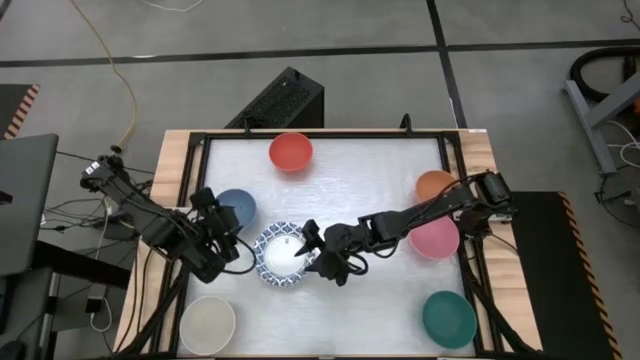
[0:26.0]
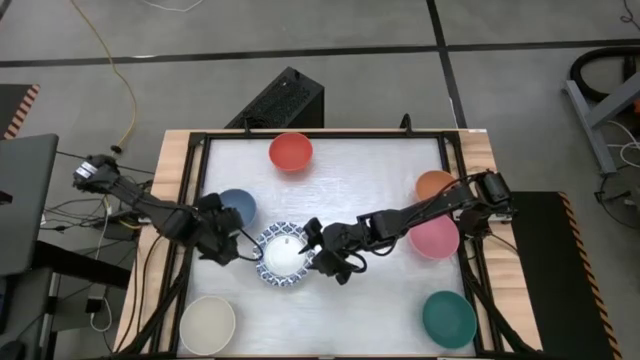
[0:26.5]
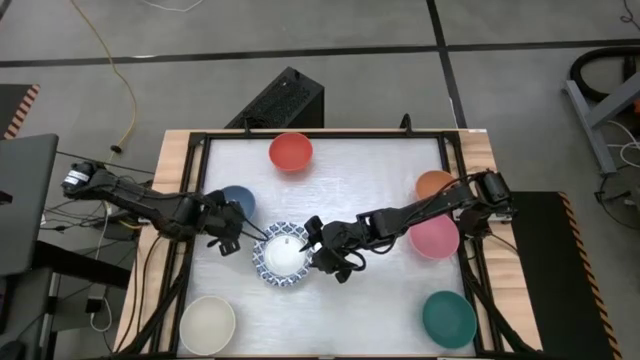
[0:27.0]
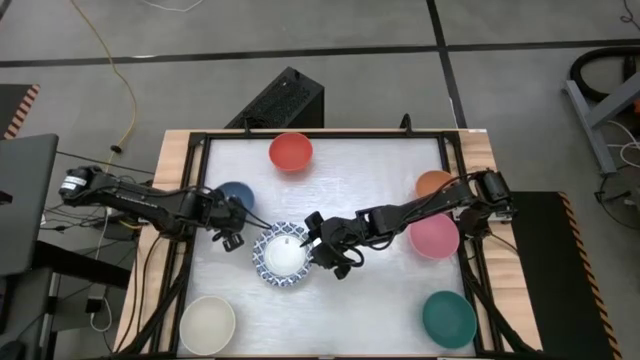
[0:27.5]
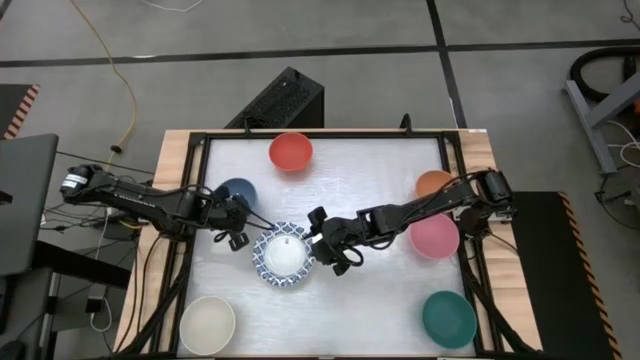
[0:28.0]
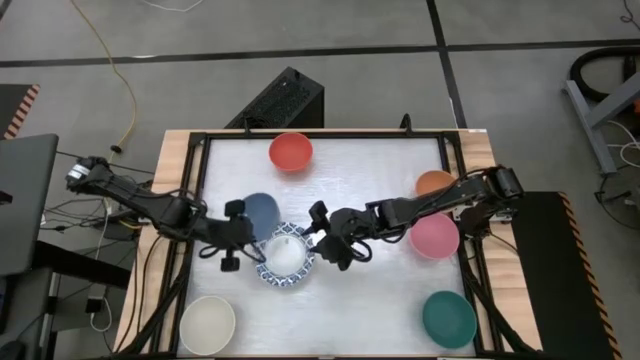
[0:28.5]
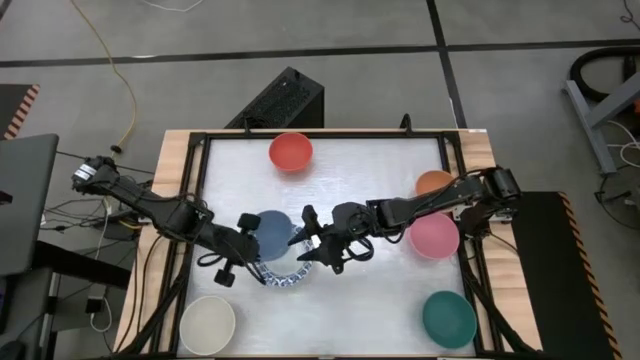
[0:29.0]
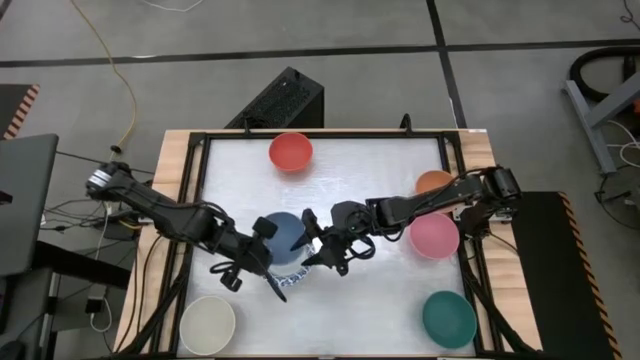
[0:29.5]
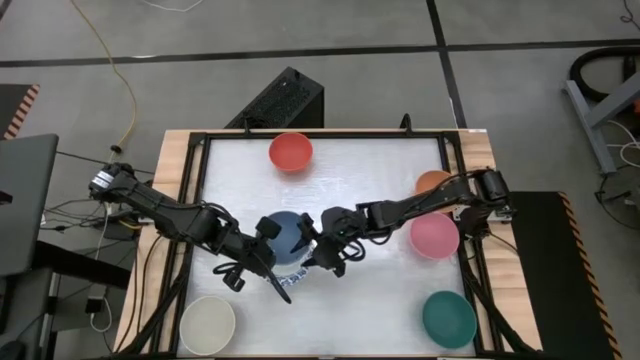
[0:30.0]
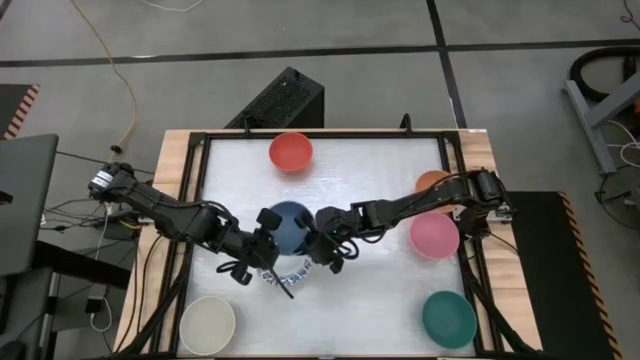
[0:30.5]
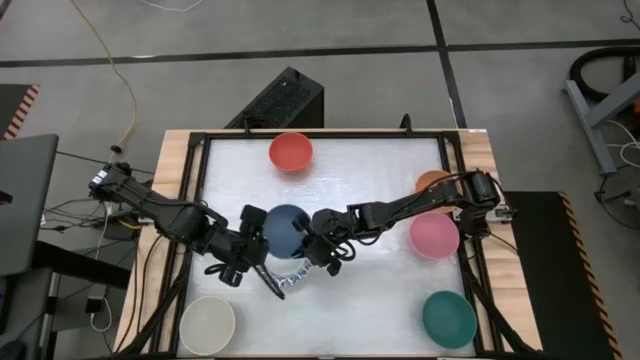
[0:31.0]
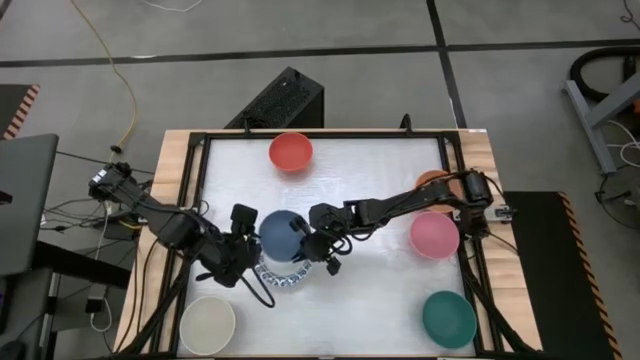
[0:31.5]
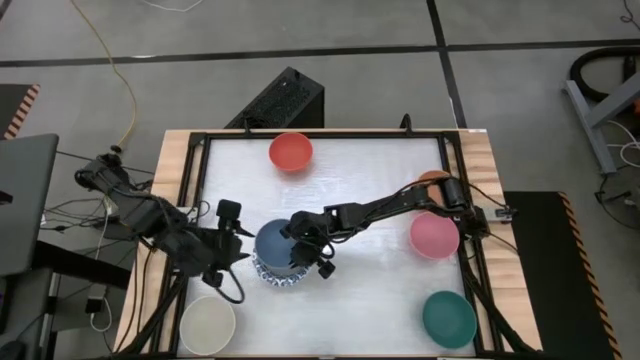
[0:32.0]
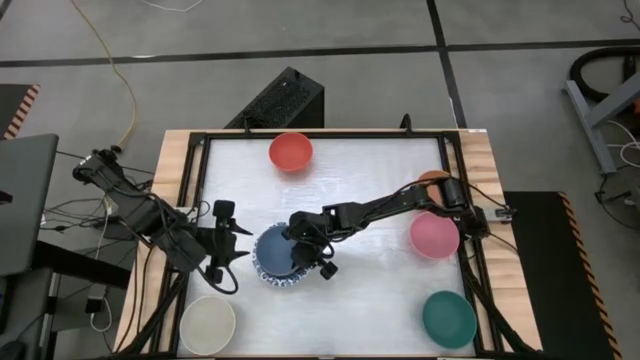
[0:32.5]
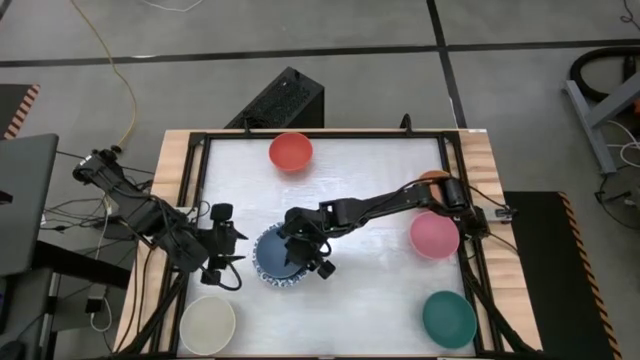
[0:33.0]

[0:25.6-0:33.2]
Stack the blue bowl on top of the white and blue bowl

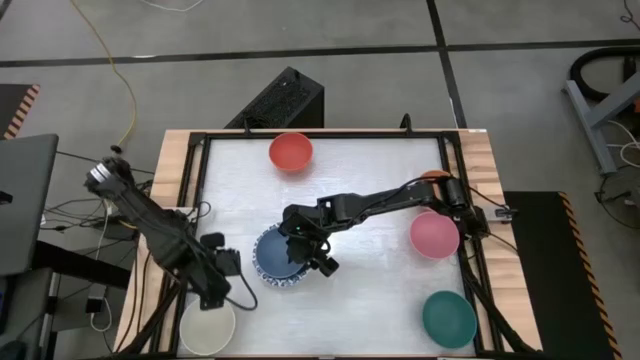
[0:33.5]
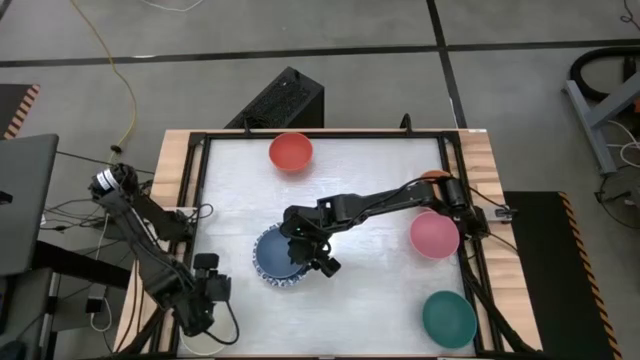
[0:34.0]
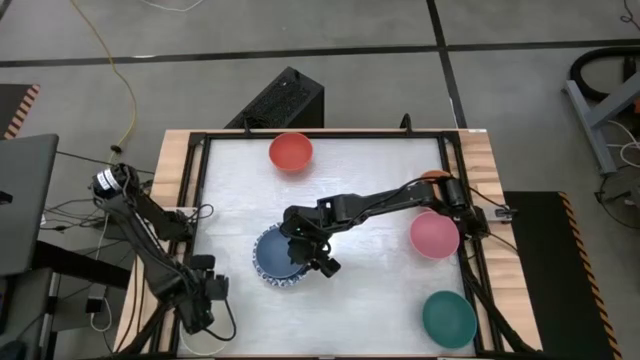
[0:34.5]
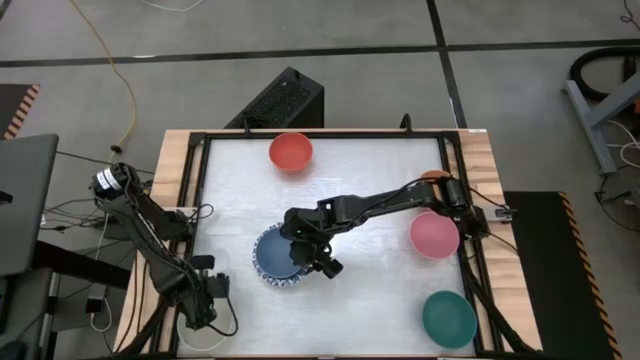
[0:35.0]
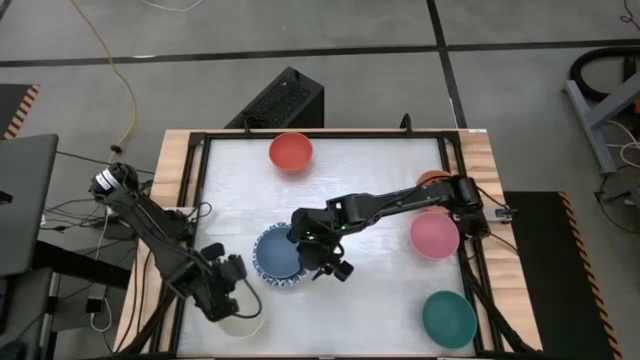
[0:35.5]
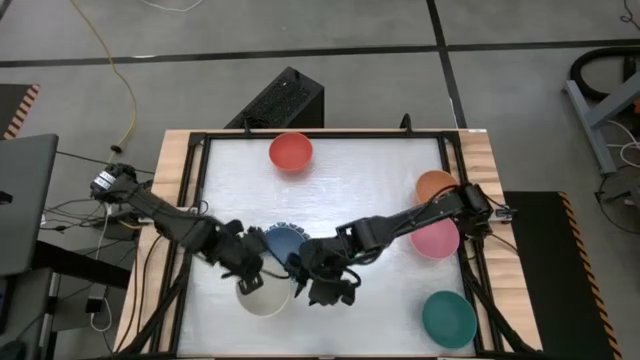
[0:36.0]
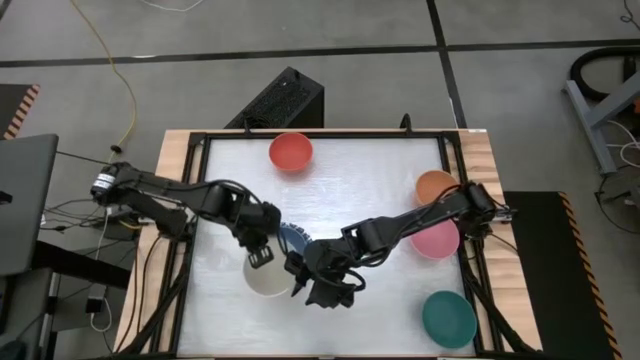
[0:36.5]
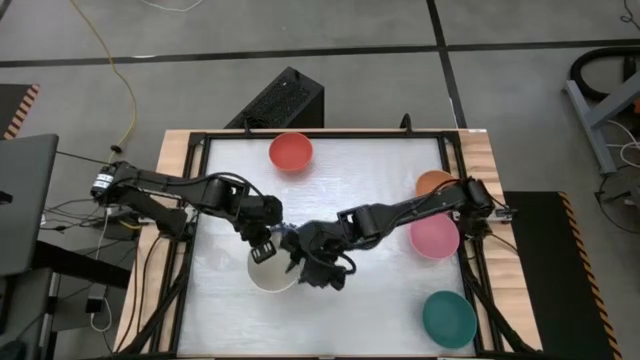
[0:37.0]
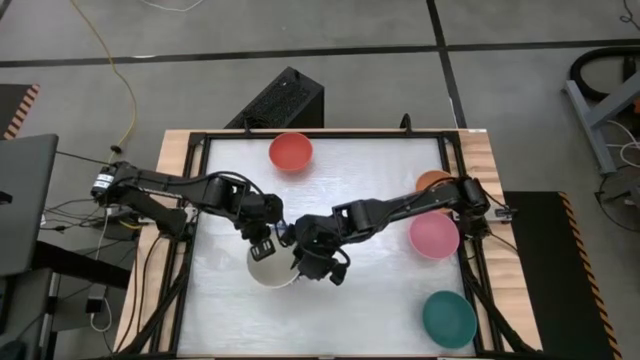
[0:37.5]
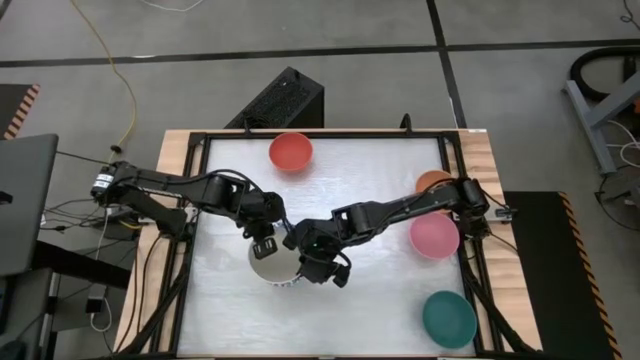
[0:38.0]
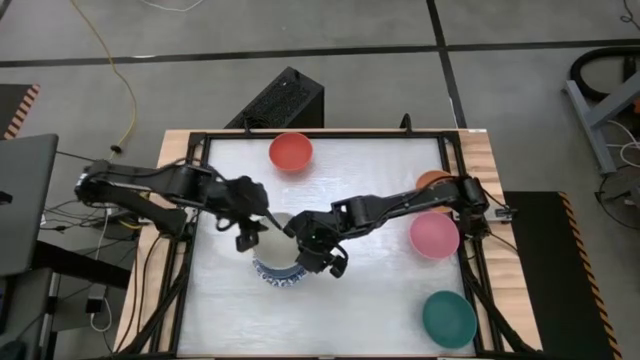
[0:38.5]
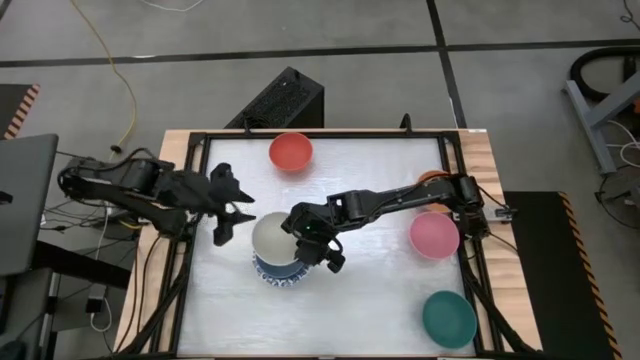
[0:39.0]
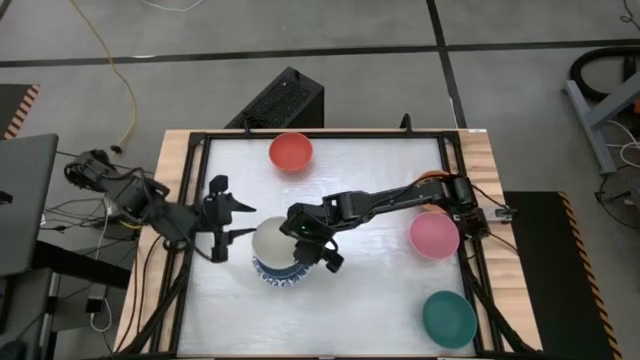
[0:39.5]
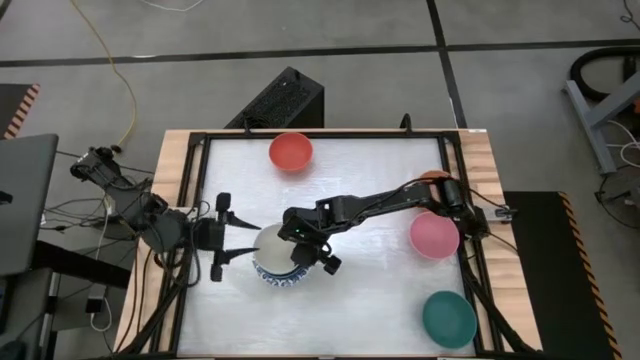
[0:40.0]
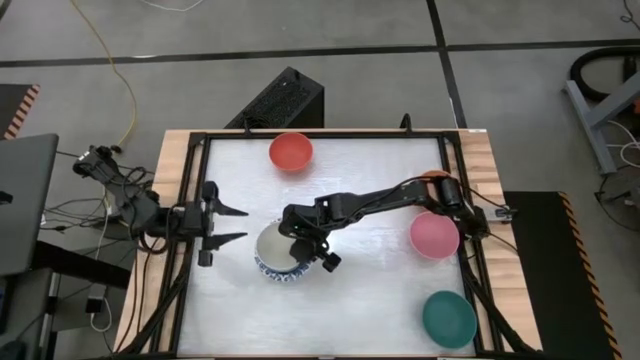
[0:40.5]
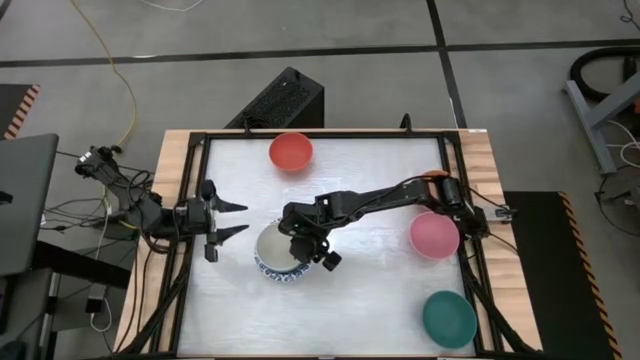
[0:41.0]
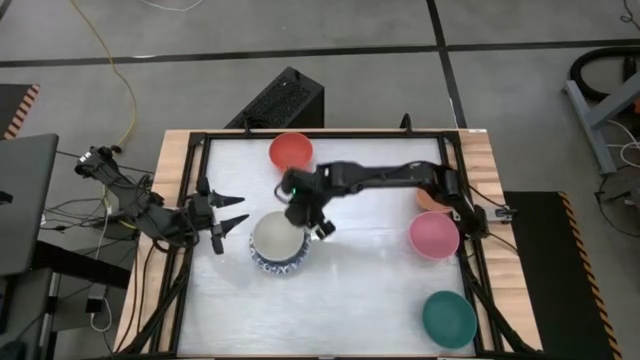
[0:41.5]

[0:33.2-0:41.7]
Stack the white bowl on top of the blue bowl

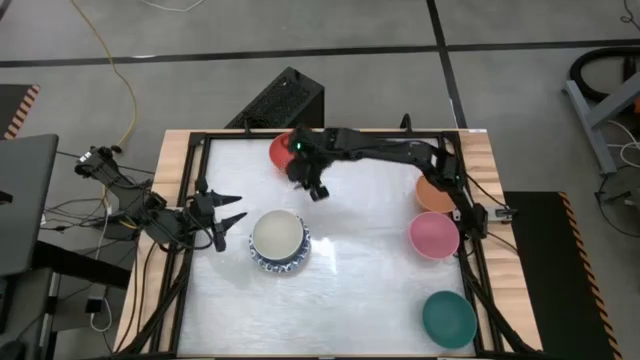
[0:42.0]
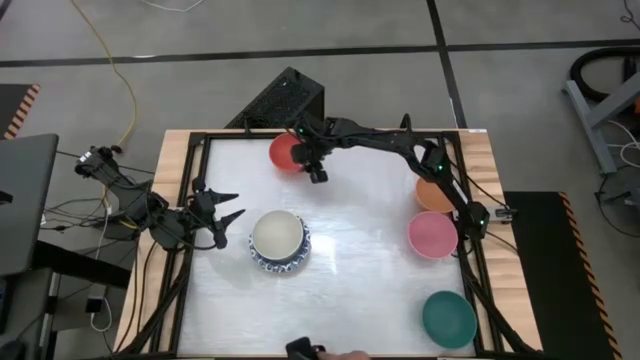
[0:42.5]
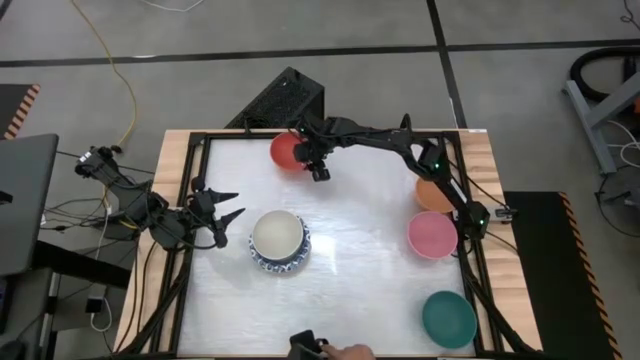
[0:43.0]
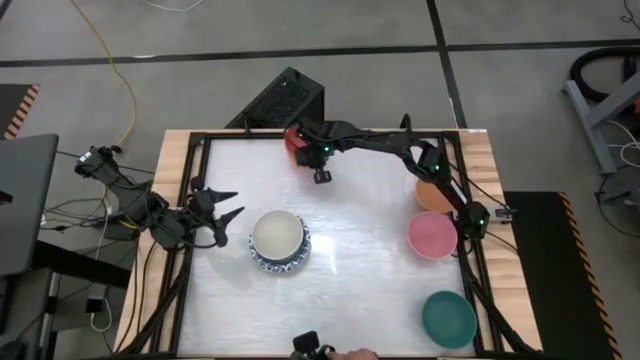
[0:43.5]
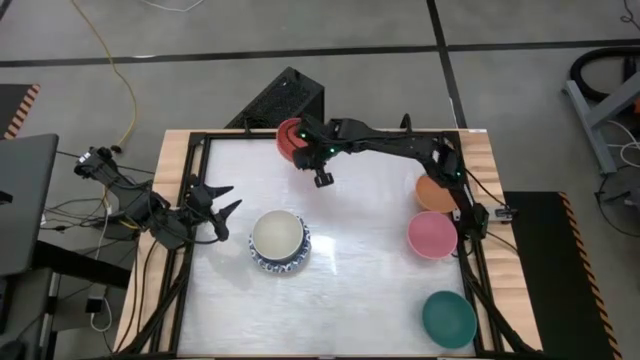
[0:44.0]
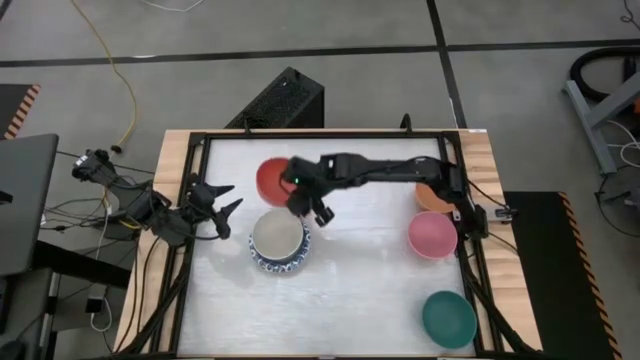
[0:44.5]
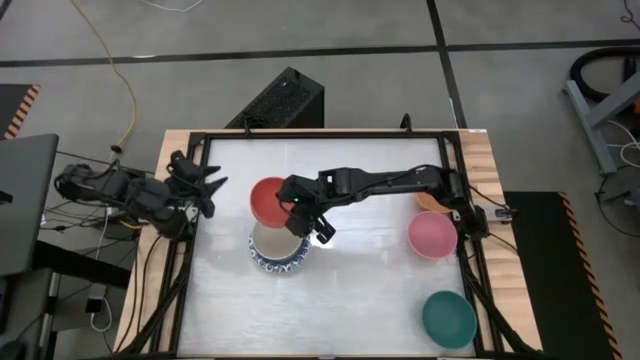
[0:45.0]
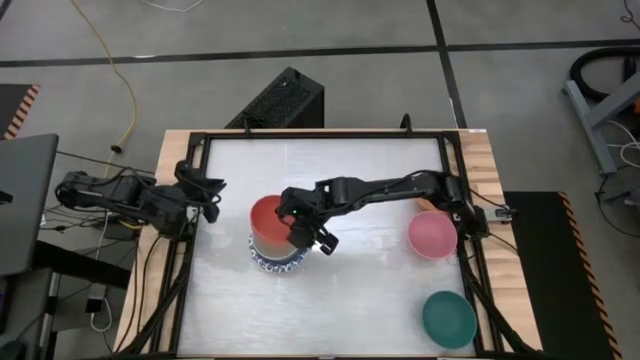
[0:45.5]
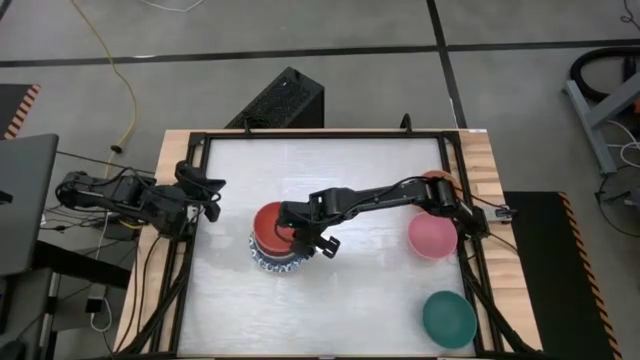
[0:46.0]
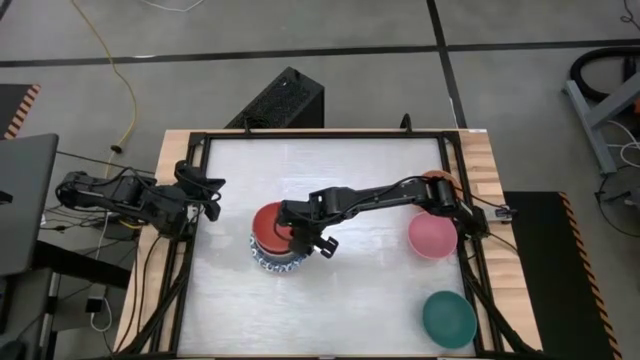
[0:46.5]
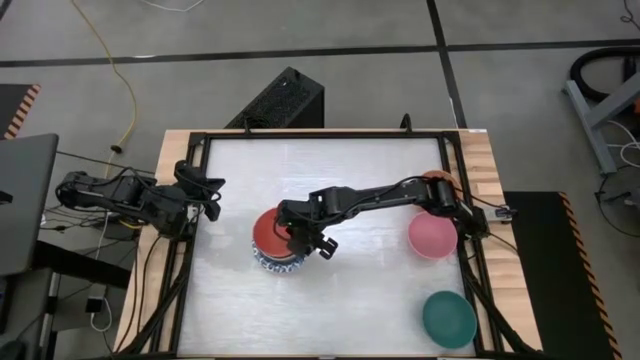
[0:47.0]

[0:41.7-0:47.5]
Stack the red bowl on top of the white bowl
